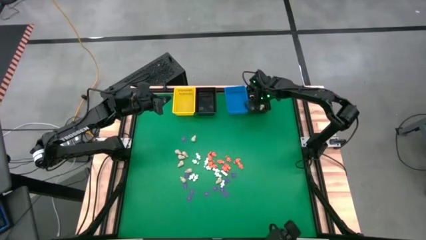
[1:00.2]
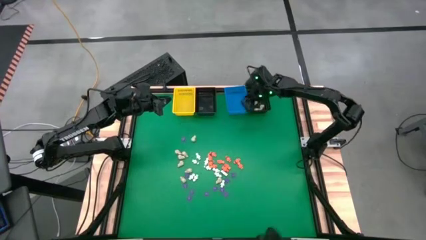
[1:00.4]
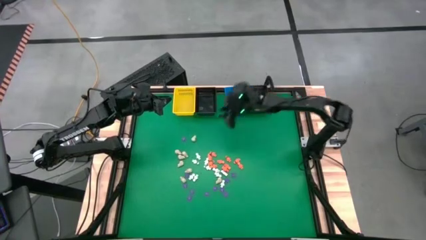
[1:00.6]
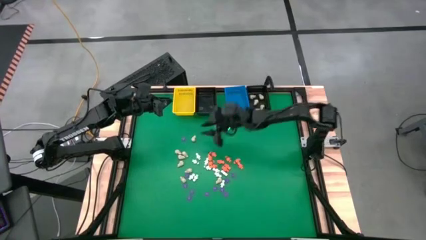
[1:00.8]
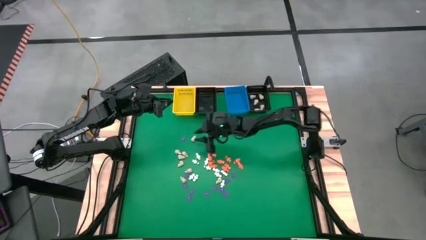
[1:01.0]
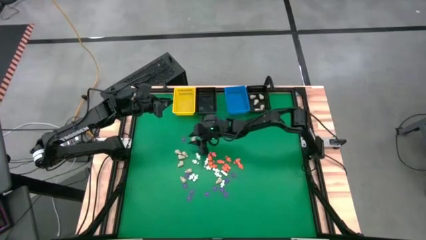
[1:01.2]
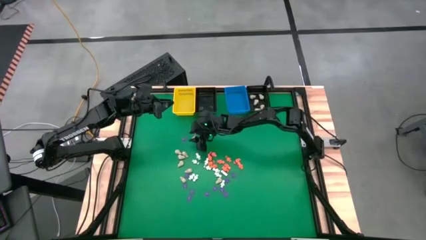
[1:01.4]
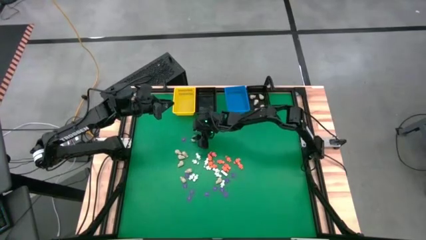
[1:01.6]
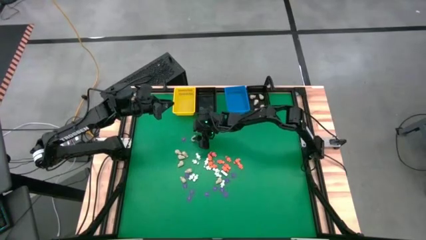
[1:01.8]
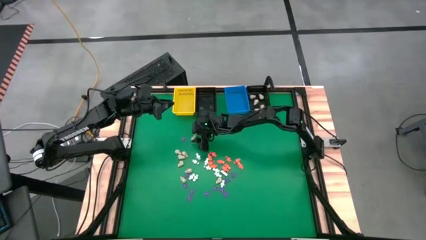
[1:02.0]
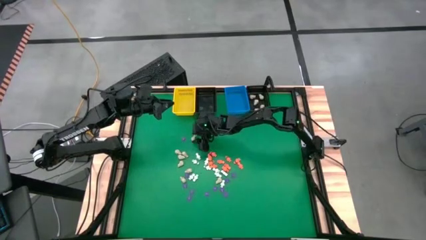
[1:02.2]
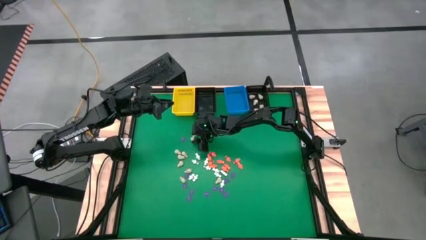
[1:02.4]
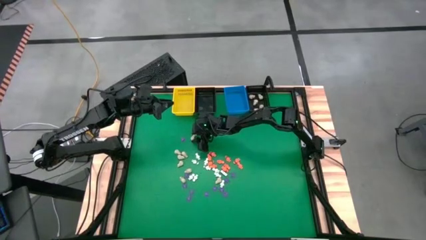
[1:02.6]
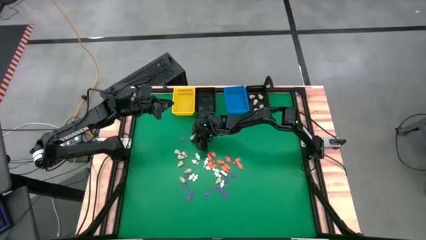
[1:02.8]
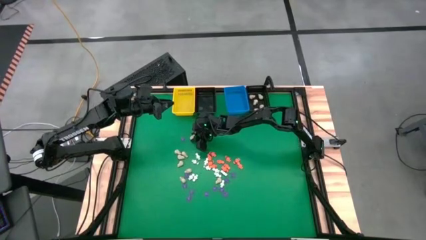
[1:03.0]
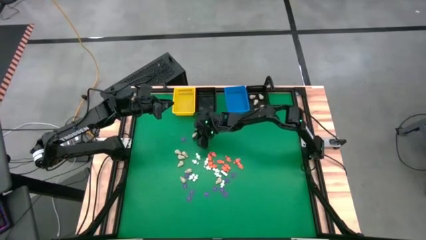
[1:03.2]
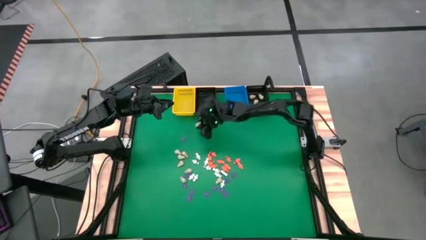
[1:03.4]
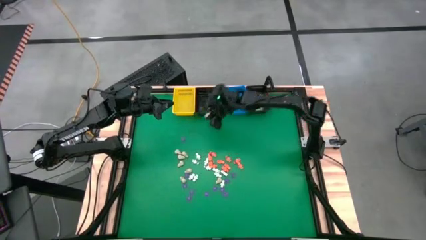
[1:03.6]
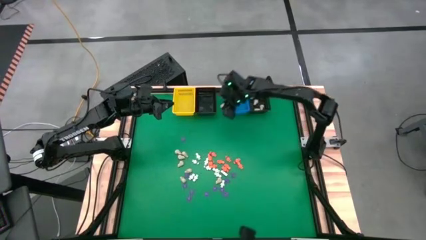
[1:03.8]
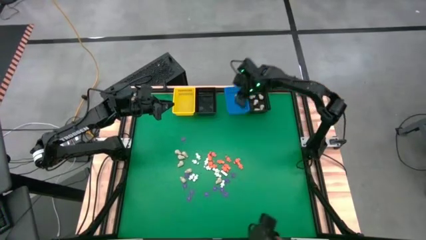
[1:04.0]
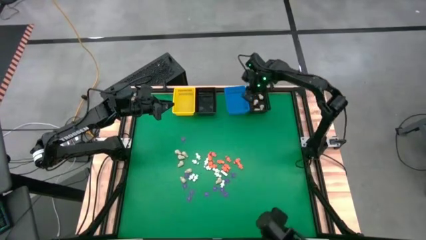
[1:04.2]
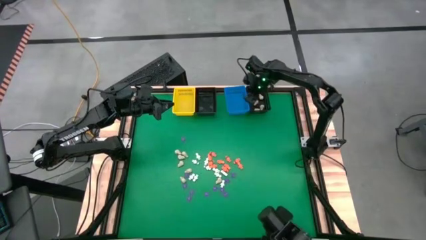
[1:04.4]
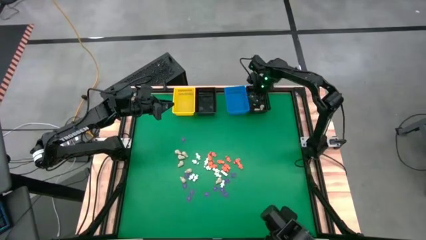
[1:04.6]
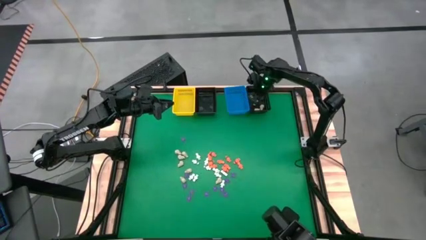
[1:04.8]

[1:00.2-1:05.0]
Task: Sort Halloween decoration
Put the white skull toy into the right black basket

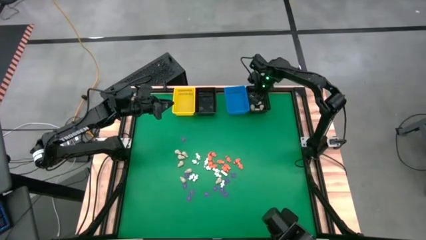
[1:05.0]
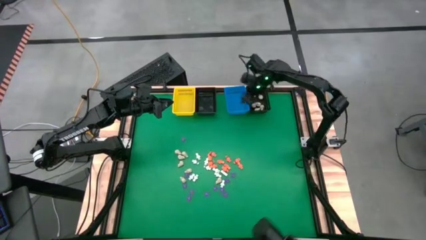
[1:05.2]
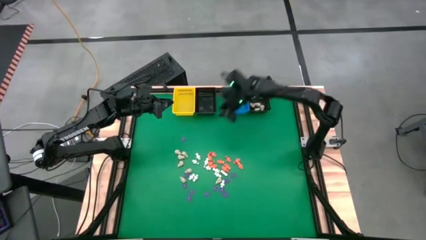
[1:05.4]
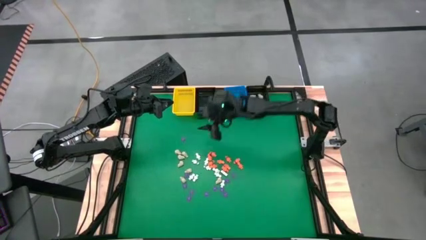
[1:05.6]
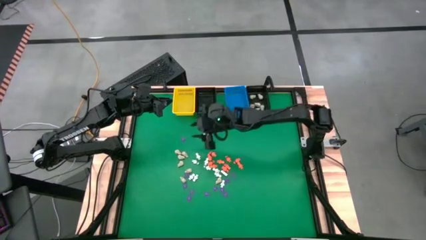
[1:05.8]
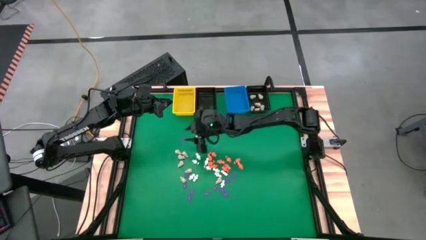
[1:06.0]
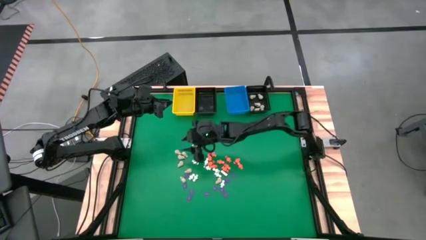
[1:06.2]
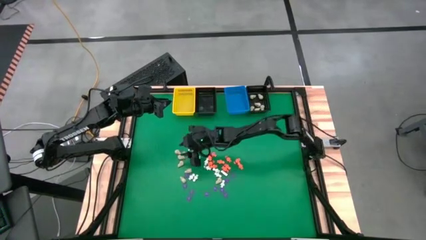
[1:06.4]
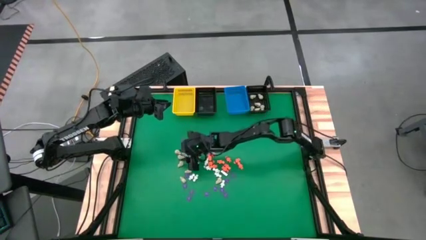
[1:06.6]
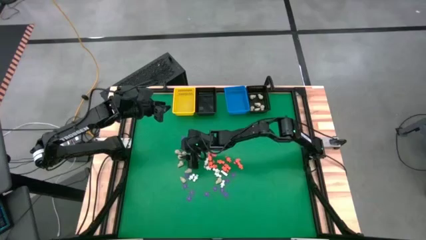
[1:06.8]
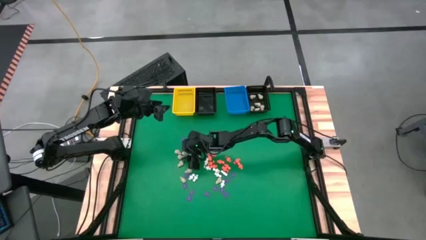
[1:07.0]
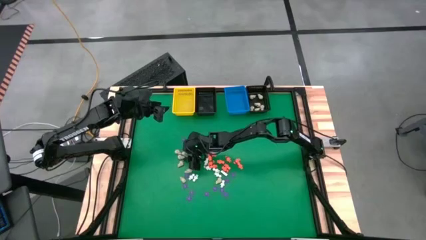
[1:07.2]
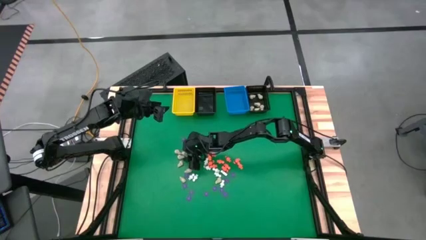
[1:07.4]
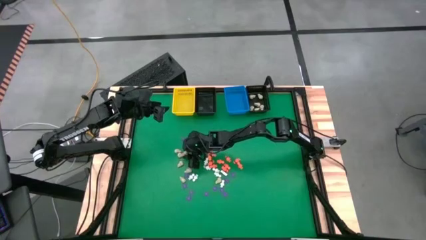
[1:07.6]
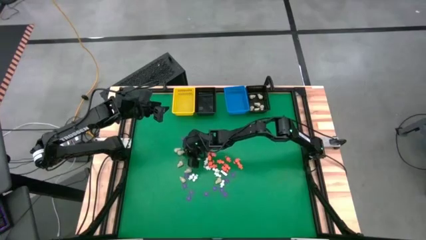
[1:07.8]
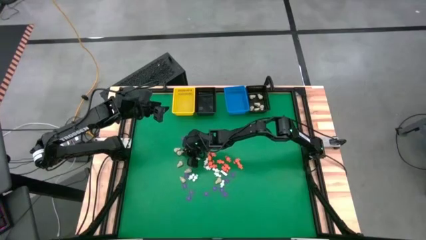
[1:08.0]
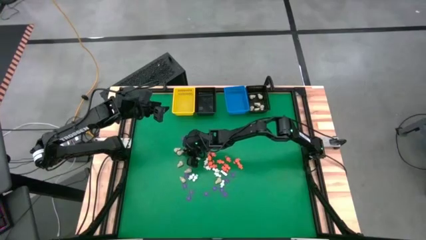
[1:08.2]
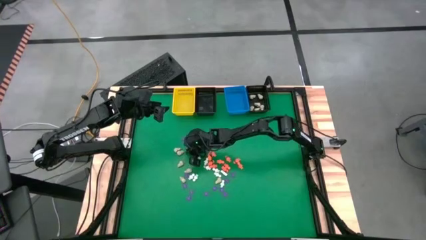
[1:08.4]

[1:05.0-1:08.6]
Put the white skull toy into the right black basket

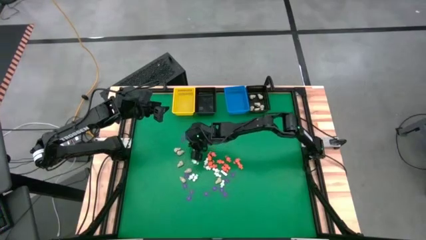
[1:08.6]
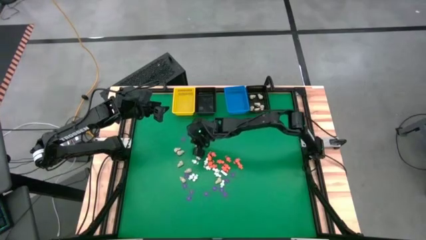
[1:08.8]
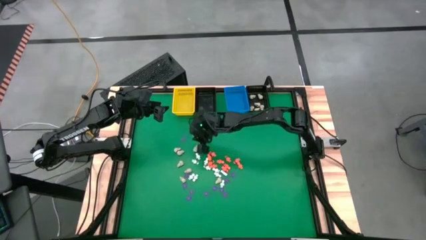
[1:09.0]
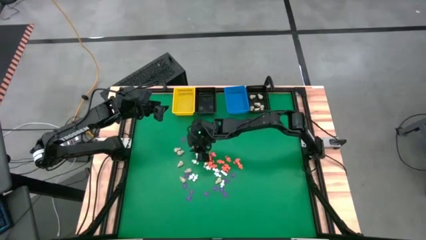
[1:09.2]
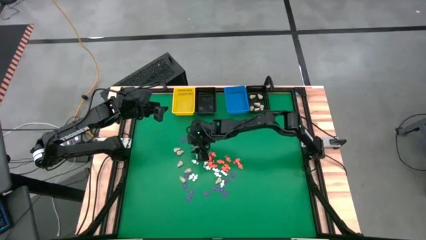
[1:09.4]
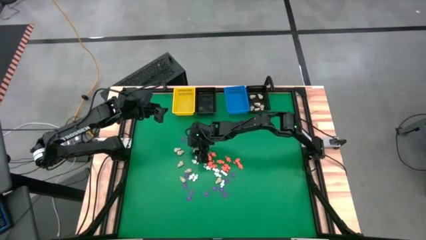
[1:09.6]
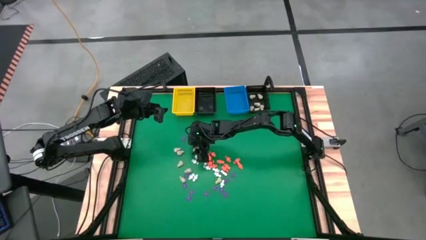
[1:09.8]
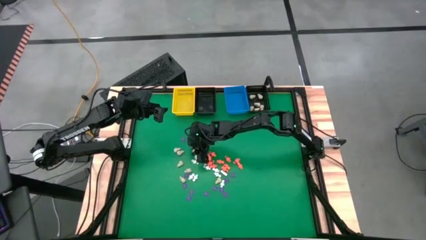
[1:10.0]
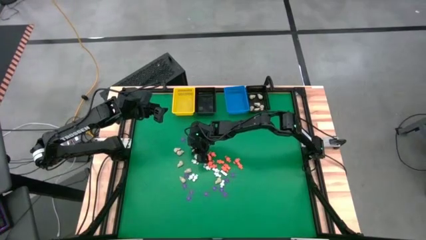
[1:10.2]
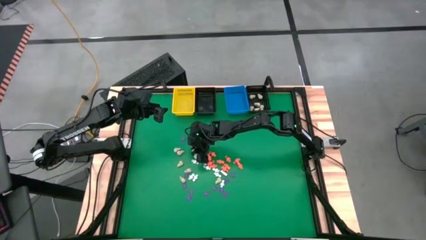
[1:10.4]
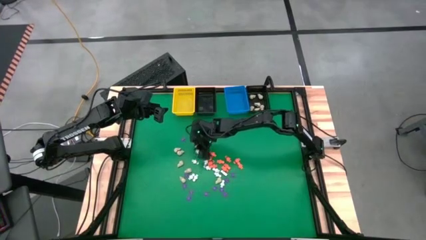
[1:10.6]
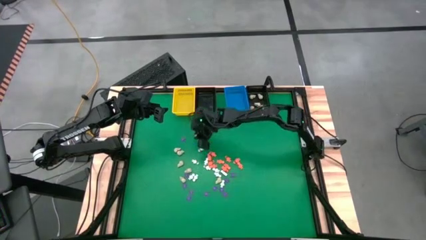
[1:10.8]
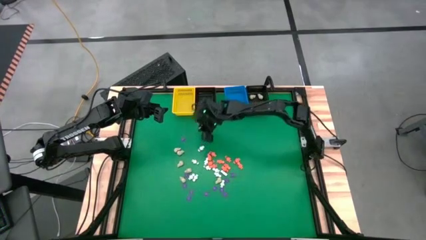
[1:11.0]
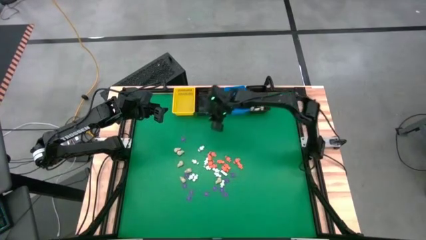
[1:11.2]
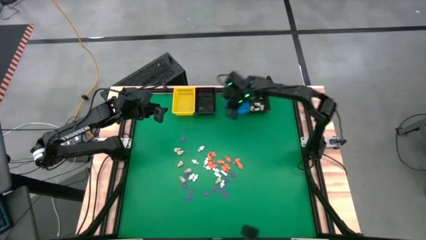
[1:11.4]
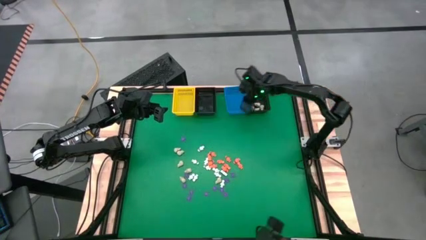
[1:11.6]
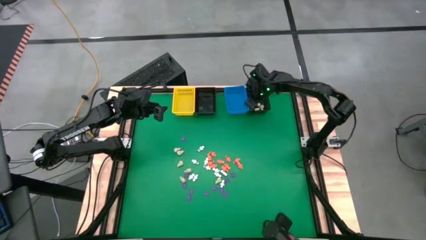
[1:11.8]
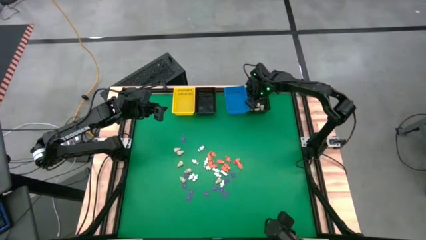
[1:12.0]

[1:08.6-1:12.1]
Put the white skull toy into the right black basket

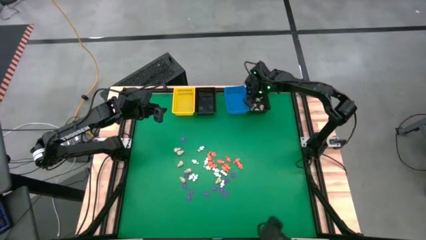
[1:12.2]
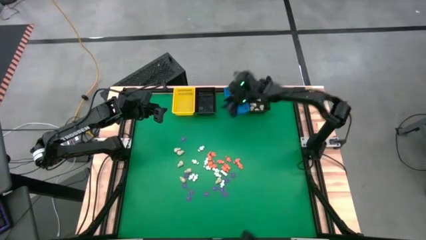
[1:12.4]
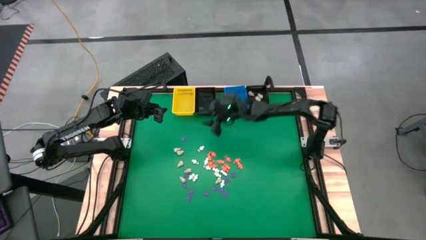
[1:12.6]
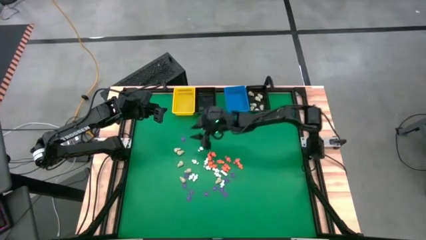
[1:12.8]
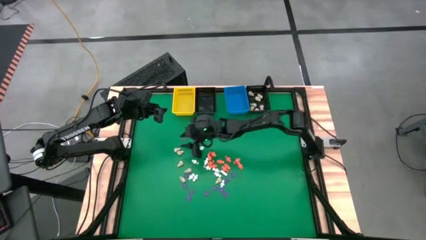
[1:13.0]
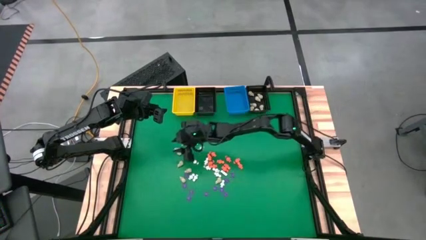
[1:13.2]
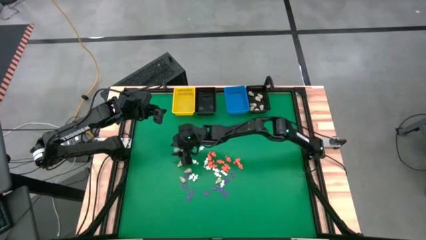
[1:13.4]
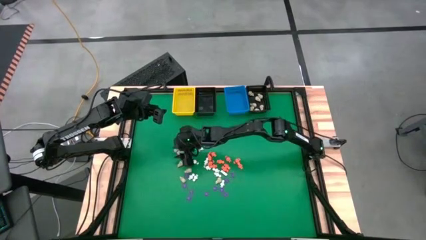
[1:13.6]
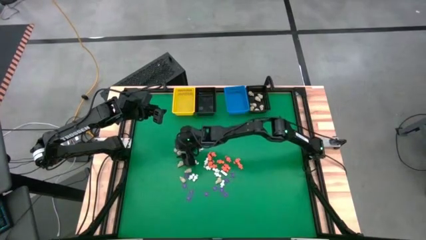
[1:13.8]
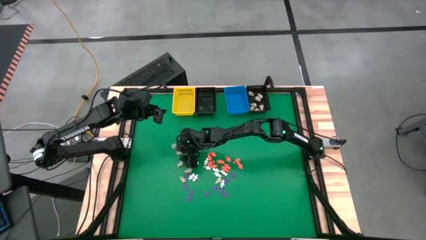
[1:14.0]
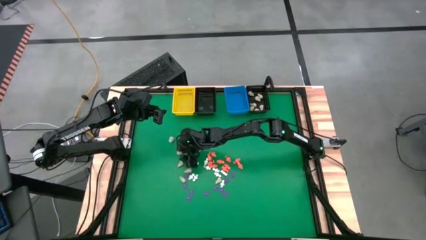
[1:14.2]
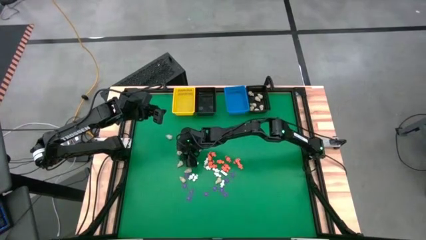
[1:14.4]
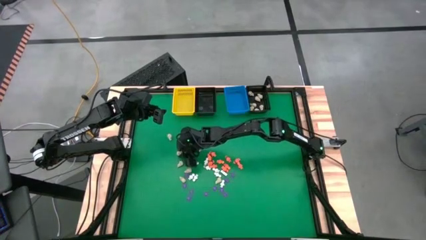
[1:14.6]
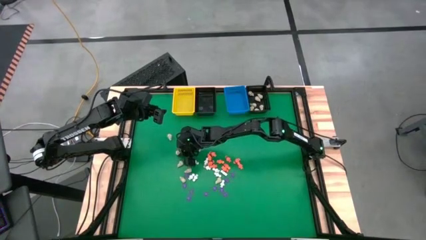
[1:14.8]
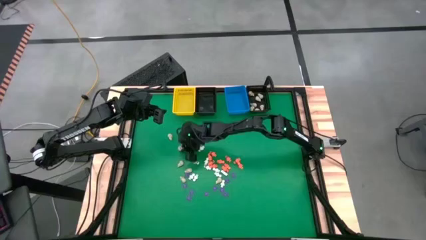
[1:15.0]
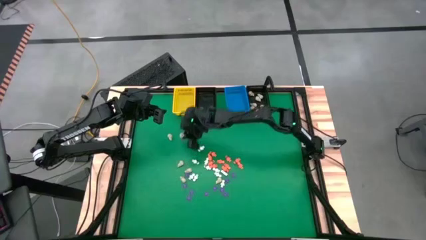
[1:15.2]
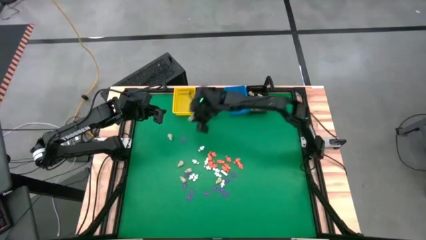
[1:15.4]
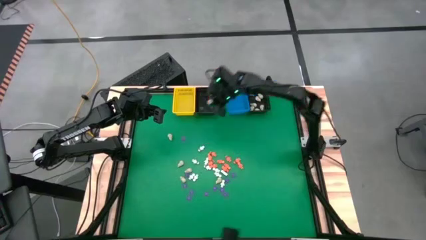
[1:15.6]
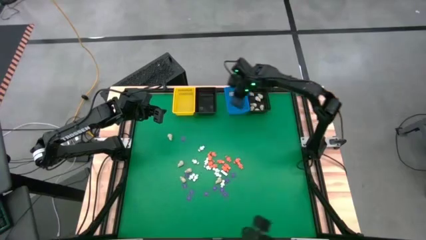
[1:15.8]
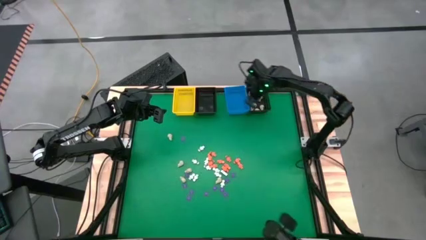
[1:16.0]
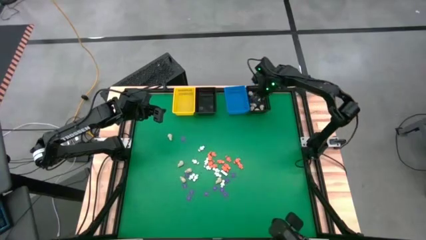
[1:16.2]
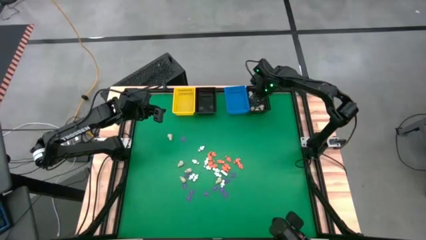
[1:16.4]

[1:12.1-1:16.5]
Put the white skull toy into the right black basket

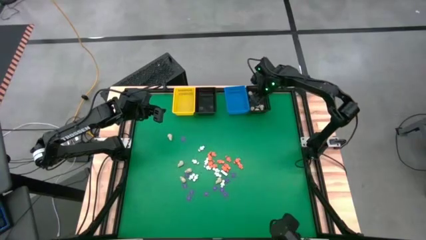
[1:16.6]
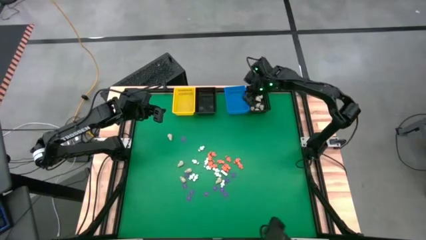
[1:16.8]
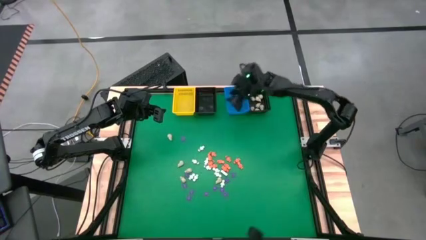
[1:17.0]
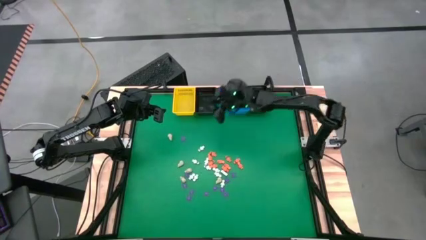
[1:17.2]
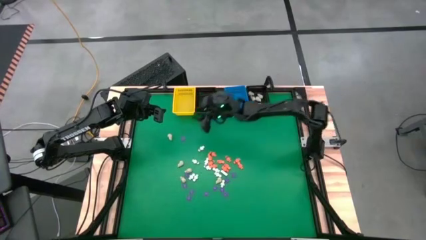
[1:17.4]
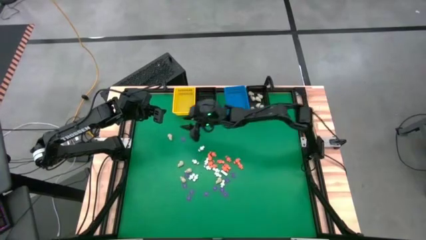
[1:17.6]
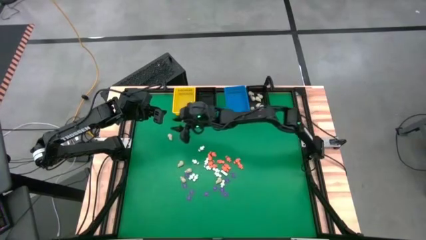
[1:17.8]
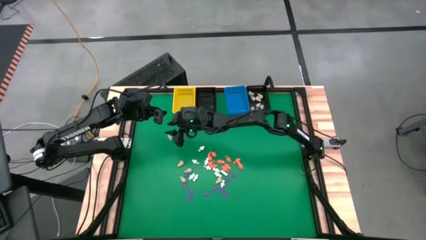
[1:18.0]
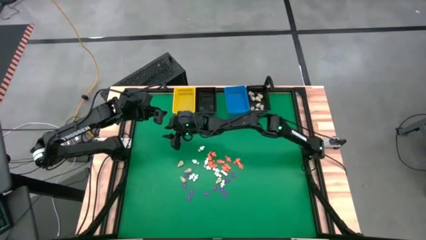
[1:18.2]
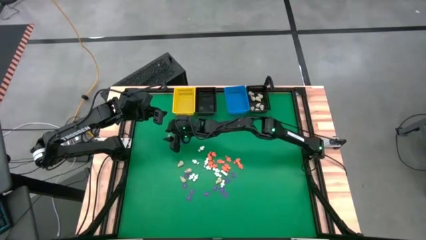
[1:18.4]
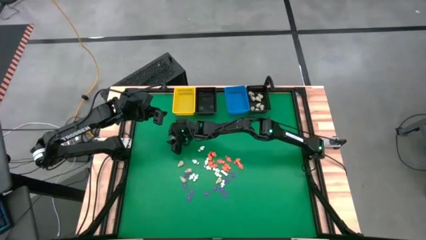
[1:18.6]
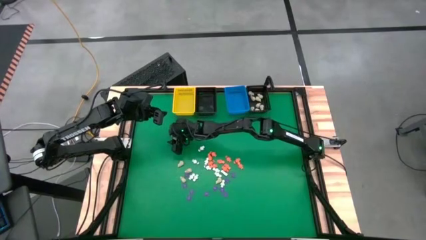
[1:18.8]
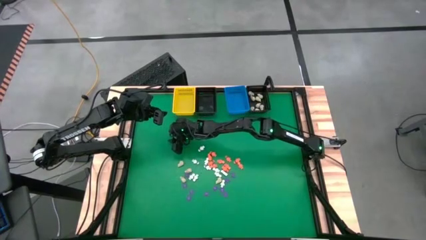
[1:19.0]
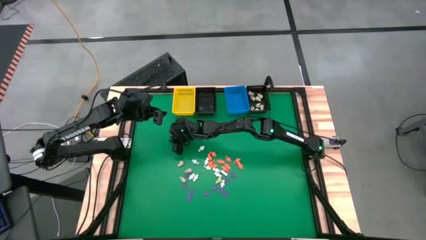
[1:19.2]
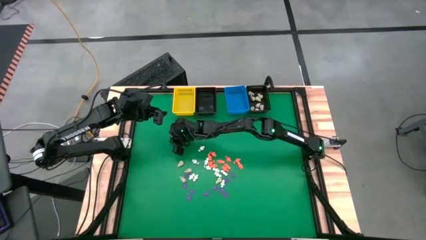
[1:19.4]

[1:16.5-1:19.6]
Put the white skull toy into the right black basket
